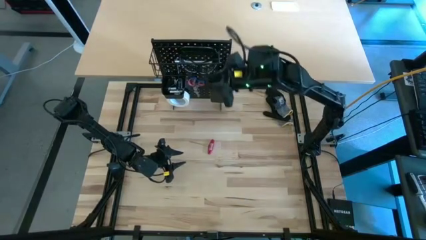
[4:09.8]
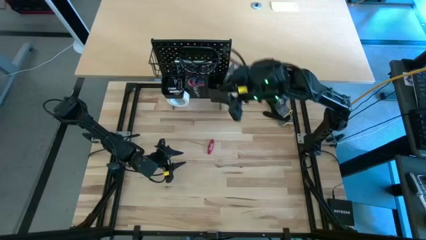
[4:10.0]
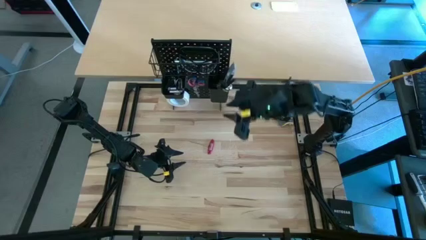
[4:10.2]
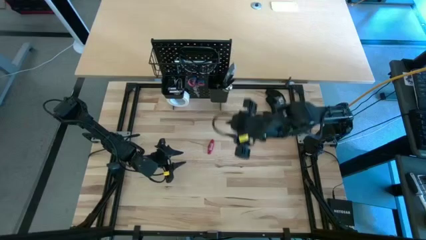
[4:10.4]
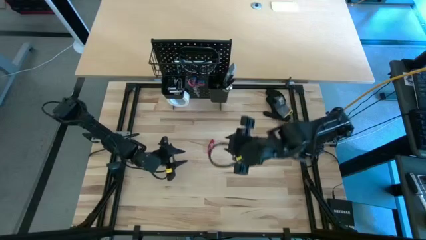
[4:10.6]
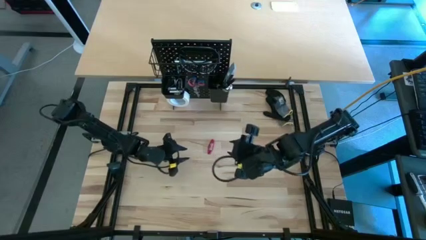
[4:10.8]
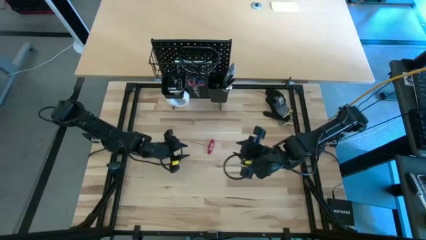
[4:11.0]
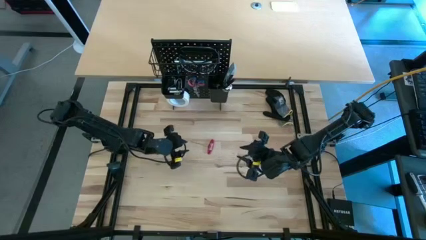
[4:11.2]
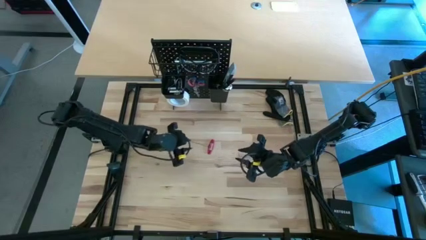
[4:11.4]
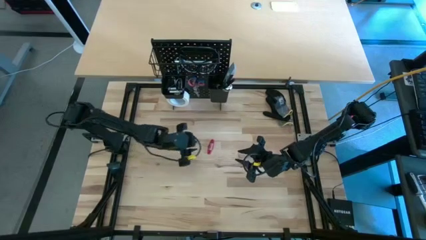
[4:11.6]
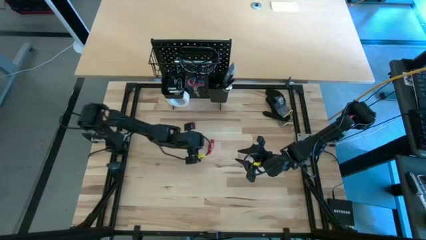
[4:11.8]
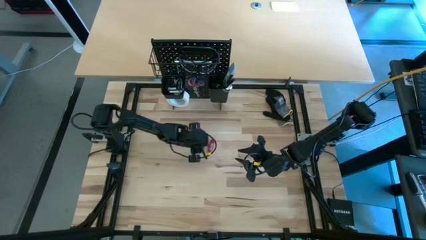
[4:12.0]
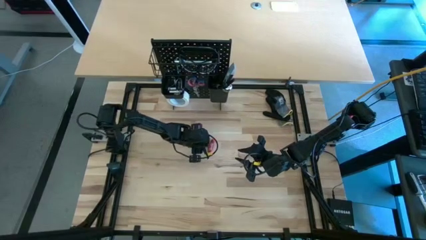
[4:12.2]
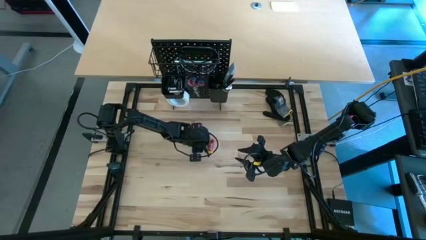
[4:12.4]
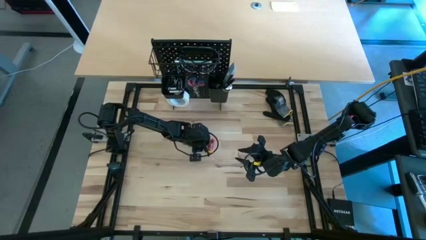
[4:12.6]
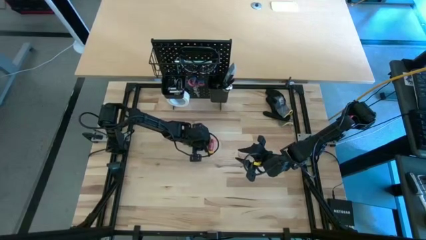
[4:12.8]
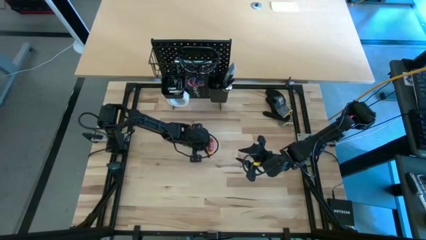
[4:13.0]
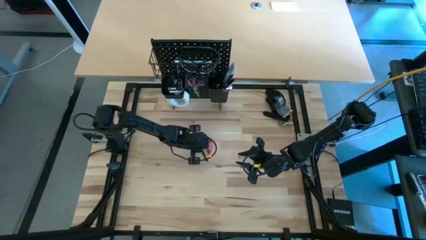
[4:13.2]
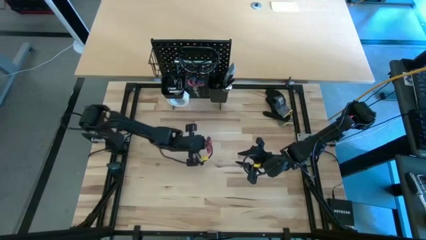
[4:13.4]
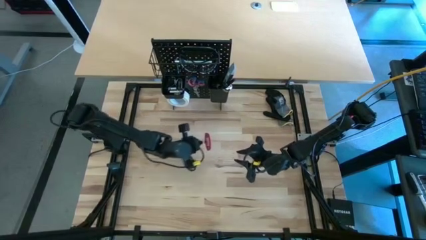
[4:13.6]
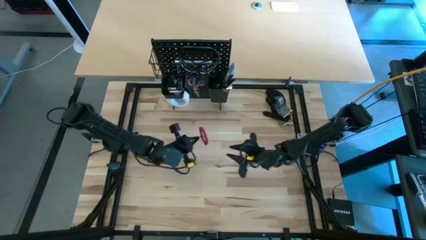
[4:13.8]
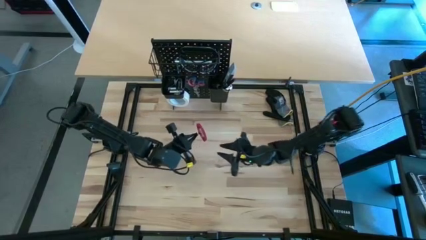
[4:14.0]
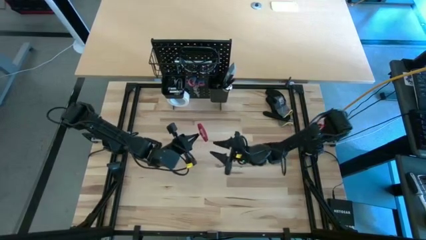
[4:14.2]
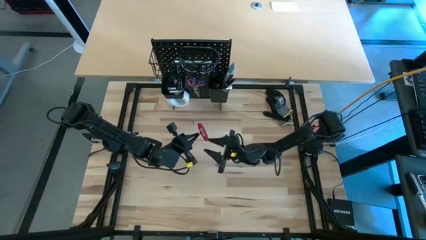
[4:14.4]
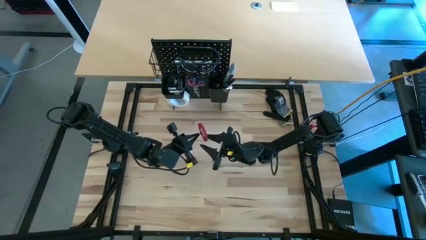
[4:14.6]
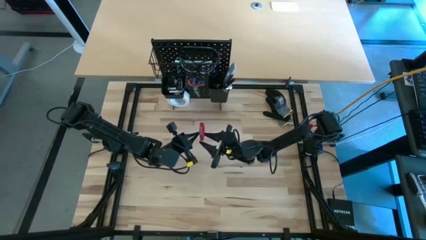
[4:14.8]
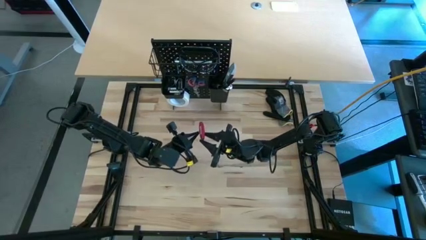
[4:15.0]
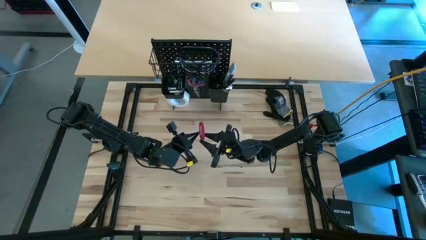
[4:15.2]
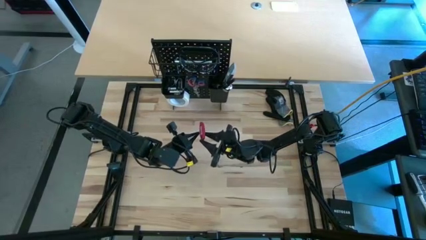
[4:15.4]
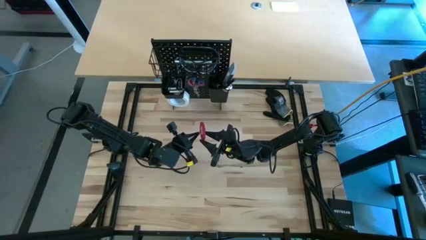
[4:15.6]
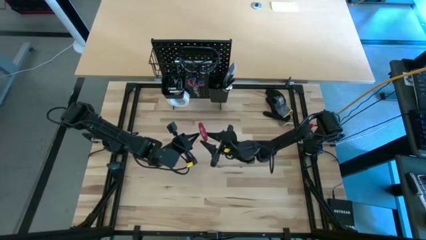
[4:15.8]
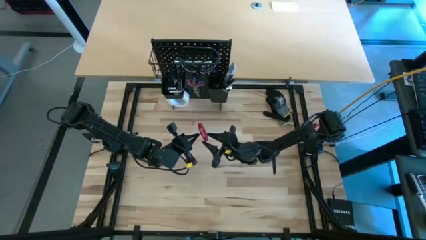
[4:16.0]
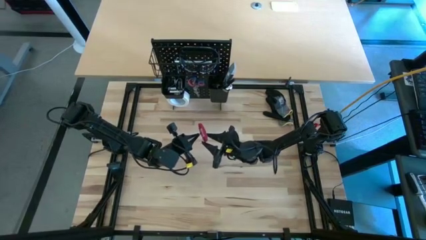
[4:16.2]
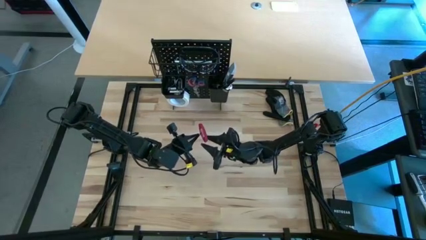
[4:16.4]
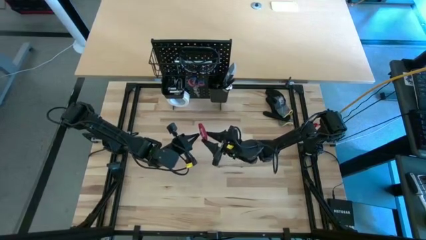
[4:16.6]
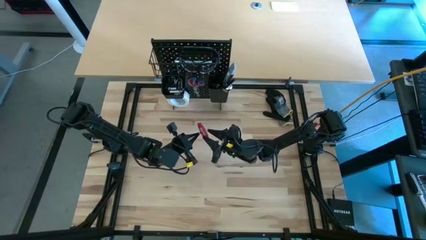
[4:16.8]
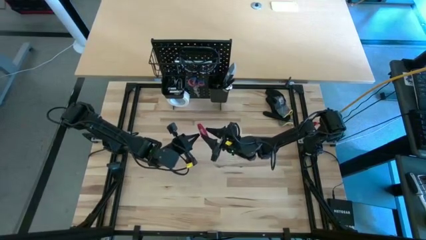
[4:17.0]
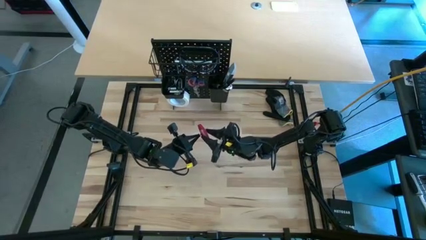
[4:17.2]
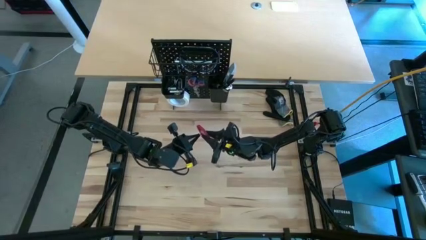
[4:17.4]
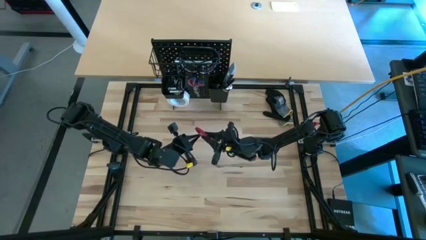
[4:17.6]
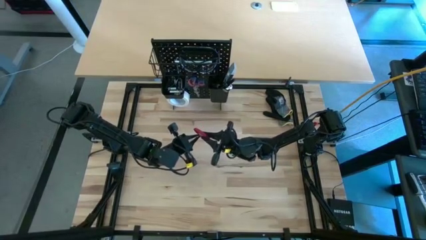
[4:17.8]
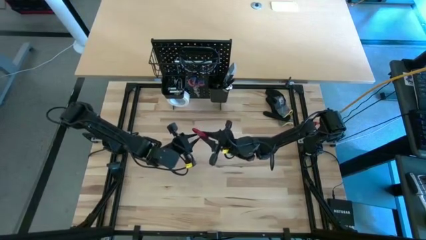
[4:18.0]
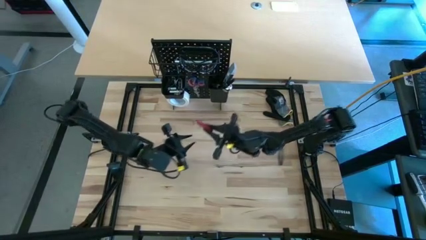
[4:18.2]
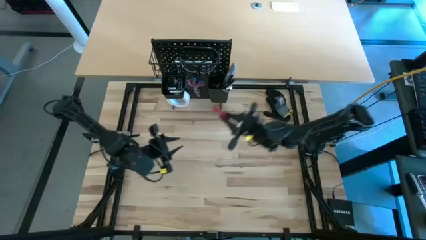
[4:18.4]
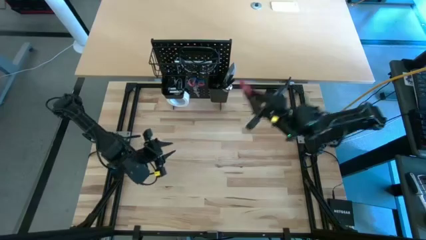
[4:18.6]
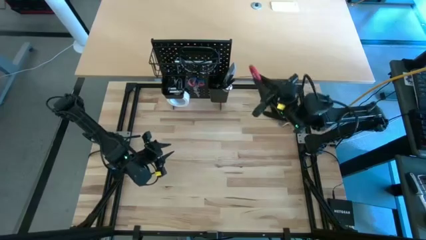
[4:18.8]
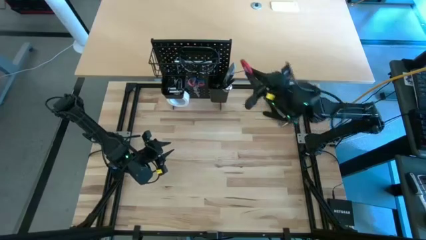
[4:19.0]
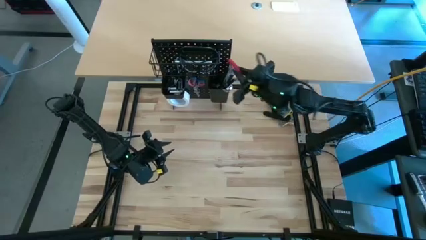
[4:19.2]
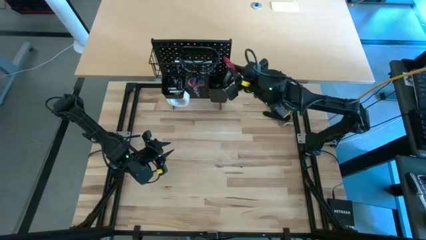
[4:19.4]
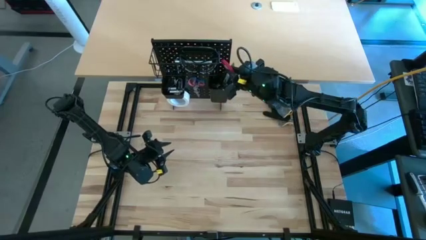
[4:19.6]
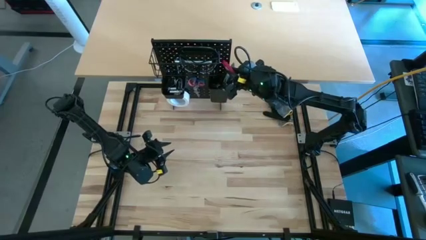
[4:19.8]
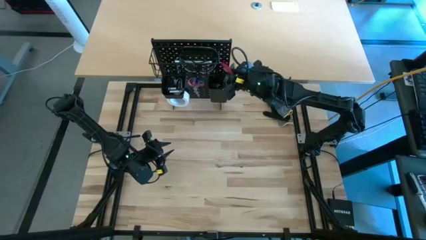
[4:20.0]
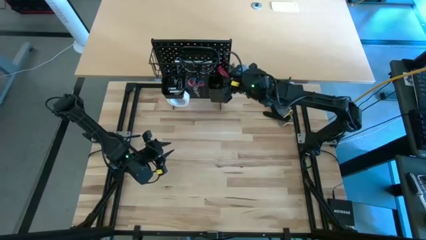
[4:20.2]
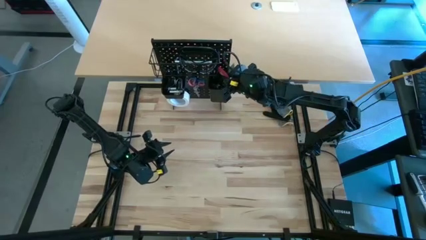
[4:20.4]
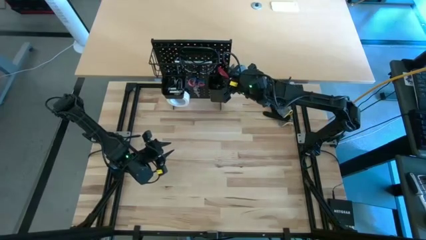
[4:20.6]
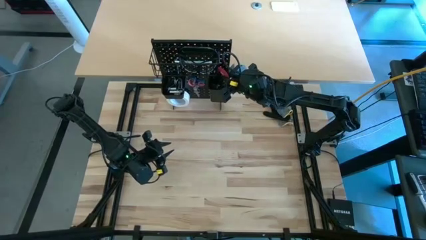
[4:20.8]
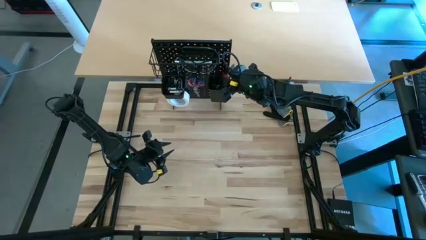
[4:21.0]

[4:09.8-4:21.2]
Task: Hang tools onto peg board
Put the red allen wrench into the right black bin on the peg board

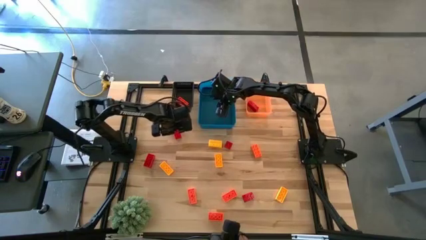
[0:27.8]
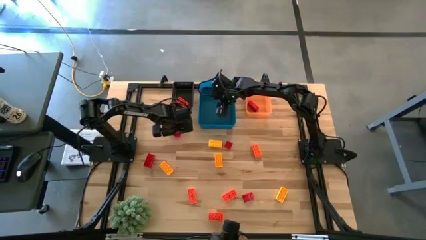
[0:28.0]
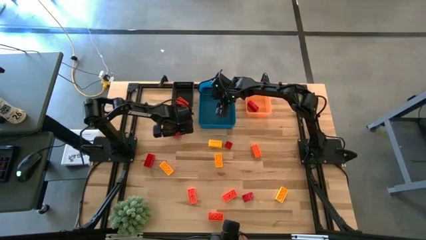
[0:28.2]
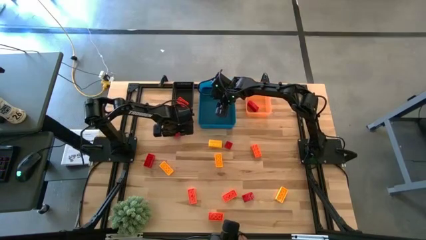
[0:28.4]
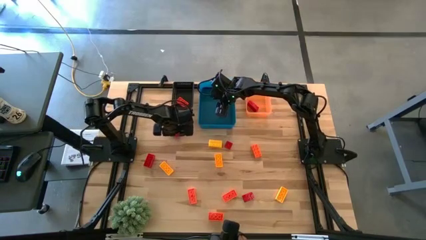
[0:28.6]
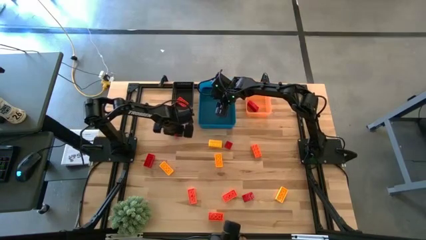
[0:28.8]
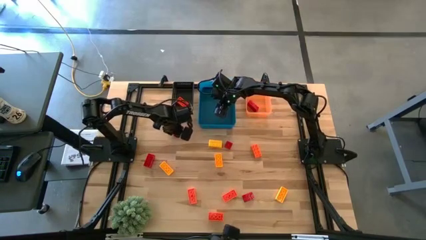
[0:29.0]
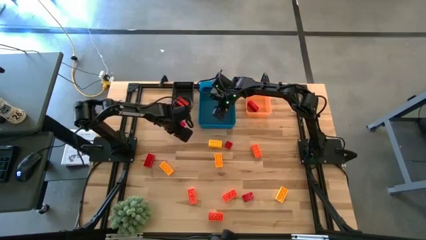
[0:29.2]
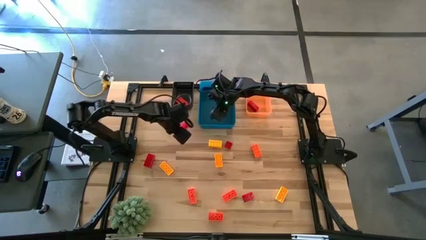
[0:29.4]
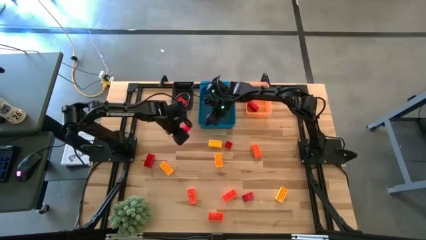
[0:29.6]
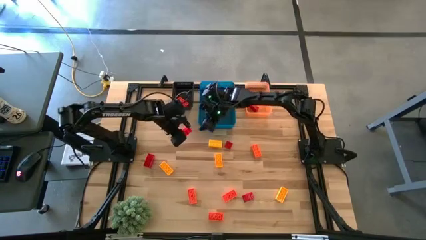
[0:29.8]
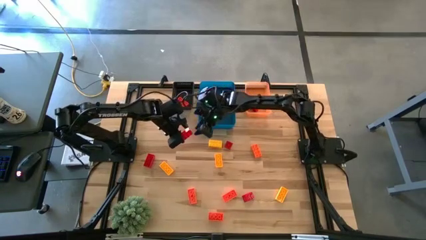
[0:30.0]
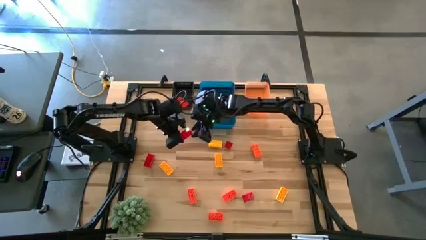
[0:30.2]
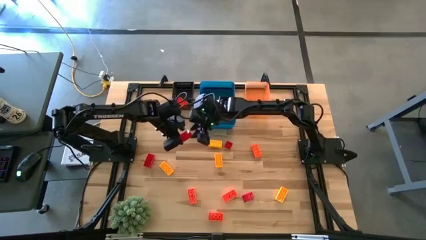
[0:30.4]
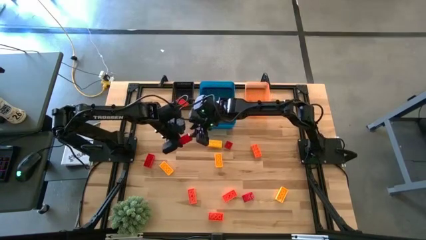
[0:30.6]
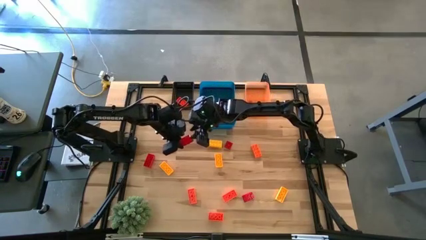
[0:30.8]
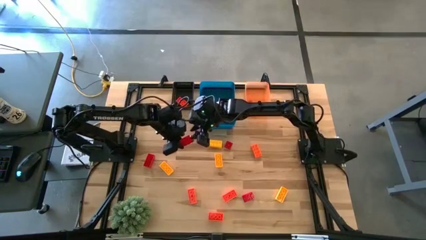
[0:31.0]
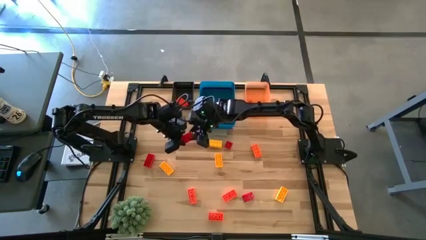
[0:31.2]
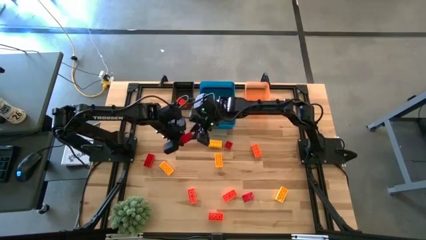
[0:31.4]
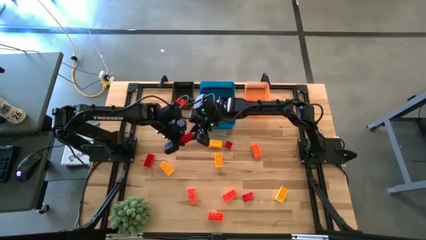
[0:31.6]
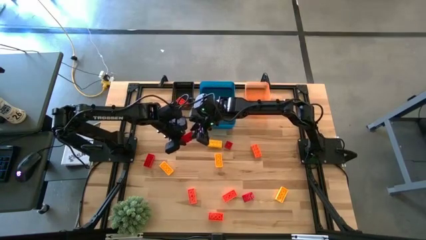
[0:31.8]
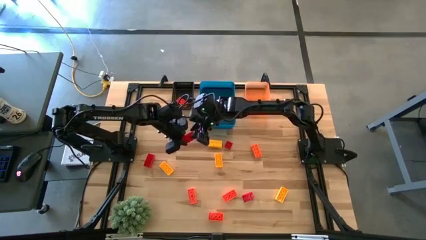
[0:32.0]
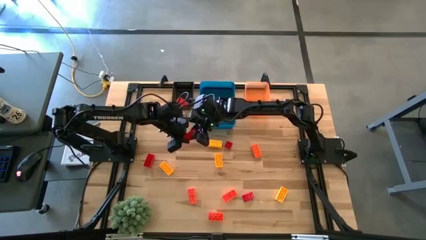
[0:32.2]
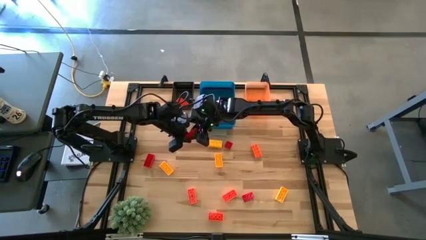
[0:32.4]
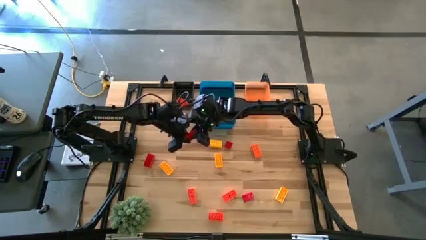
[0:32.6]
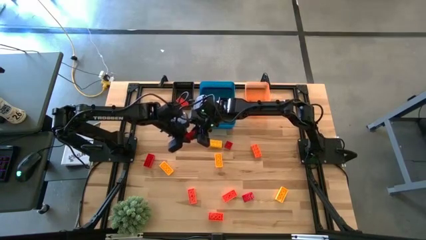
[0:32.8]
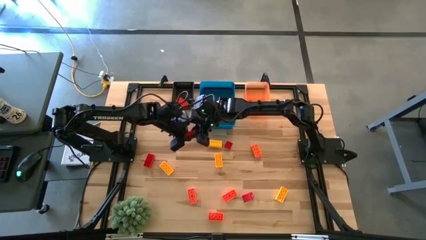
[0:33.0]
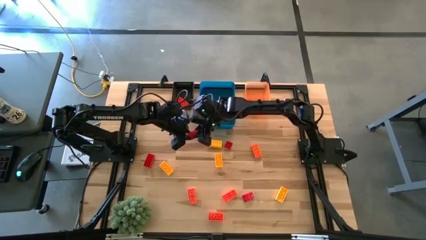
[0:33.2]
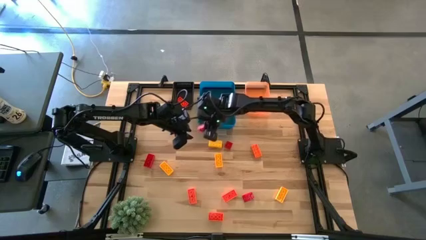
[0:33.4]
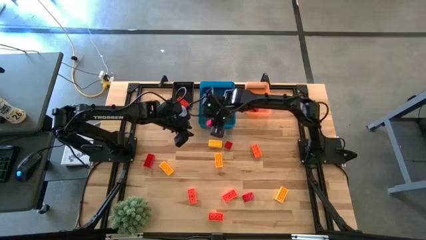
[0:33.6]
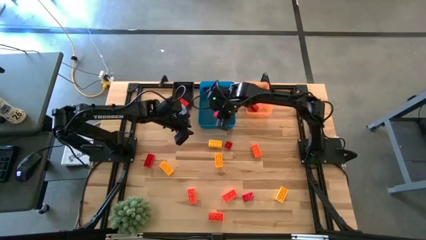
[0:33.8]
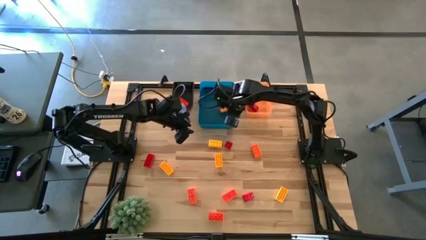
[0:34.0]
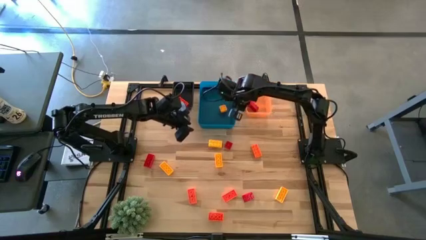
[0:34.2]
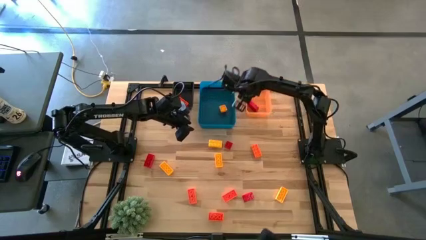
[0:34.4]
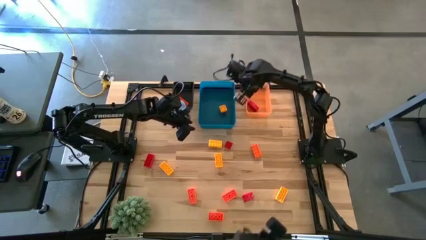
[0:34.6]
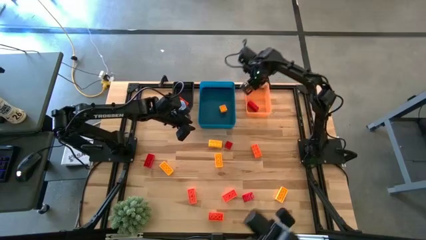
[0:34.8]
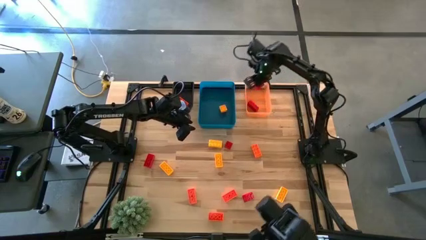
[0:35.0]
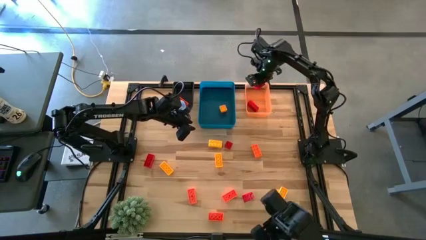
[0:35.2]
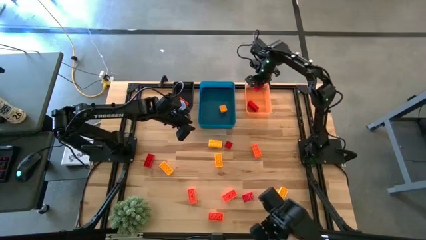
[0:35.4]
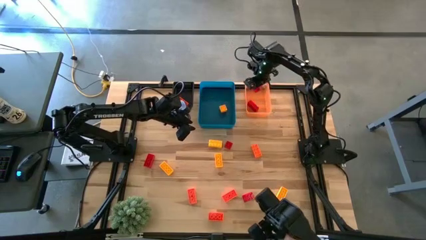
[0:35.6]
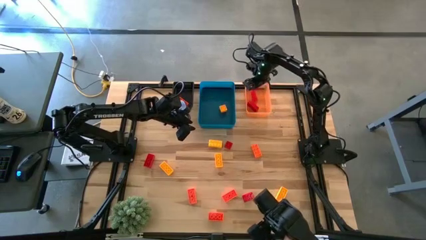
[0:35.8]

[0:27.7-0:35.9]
Task: Sort & place blocks by color
Put the red game piece into the orange bin
